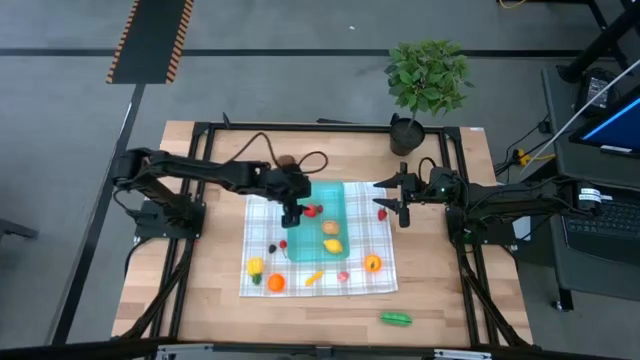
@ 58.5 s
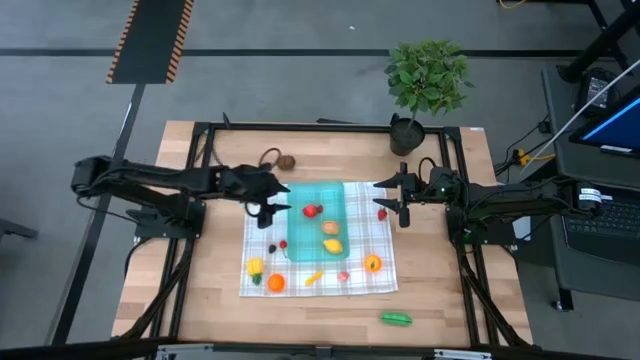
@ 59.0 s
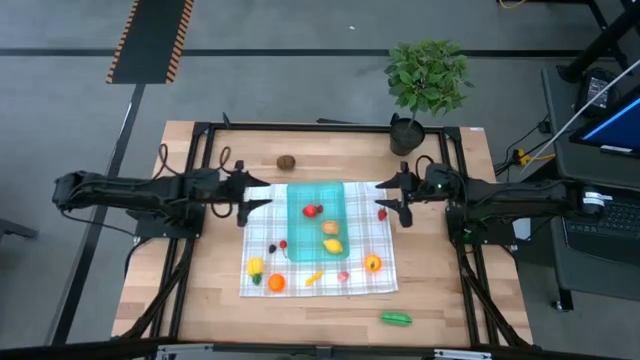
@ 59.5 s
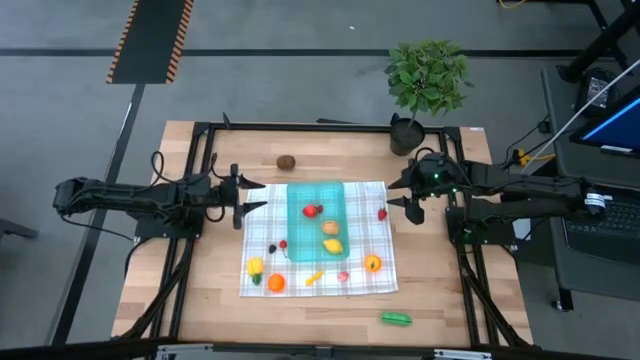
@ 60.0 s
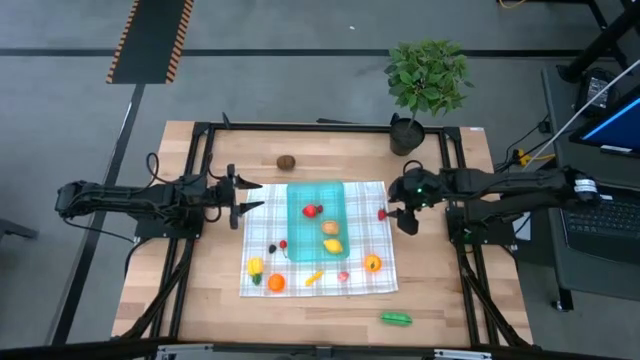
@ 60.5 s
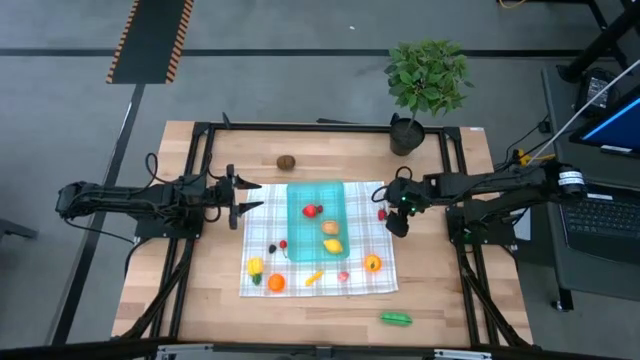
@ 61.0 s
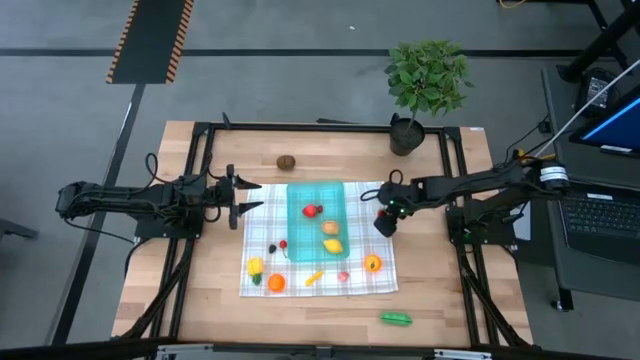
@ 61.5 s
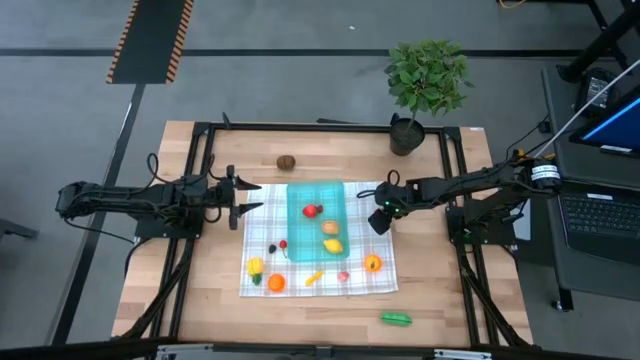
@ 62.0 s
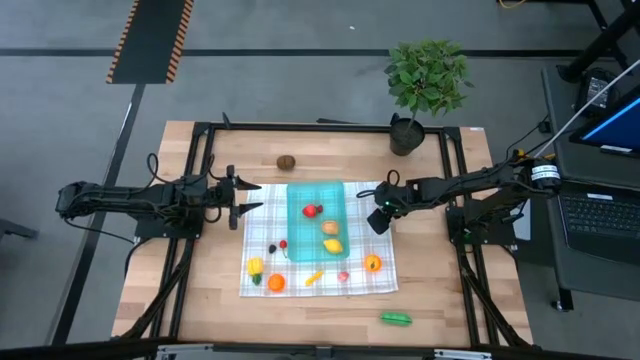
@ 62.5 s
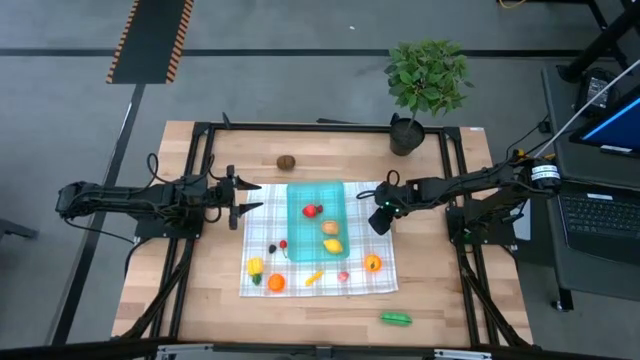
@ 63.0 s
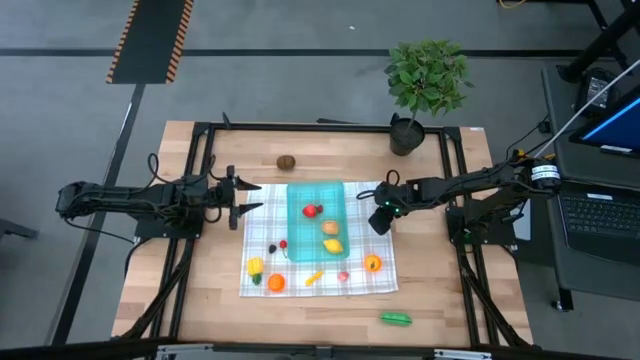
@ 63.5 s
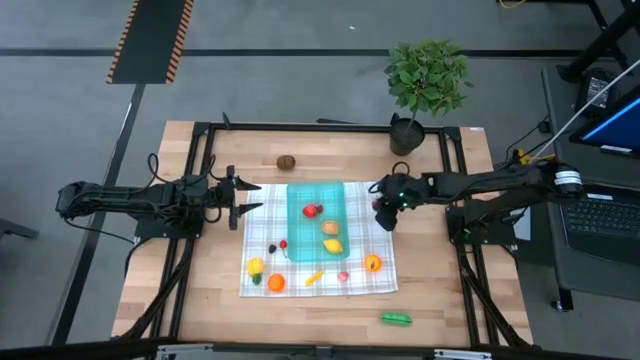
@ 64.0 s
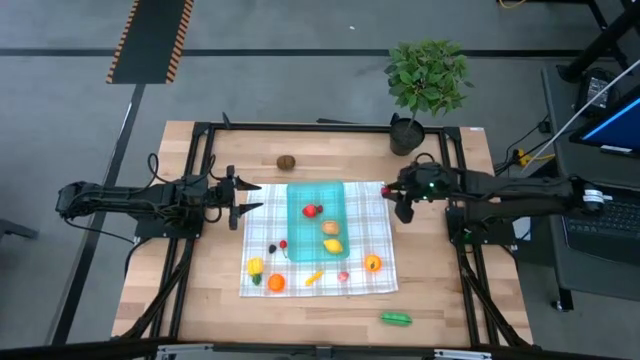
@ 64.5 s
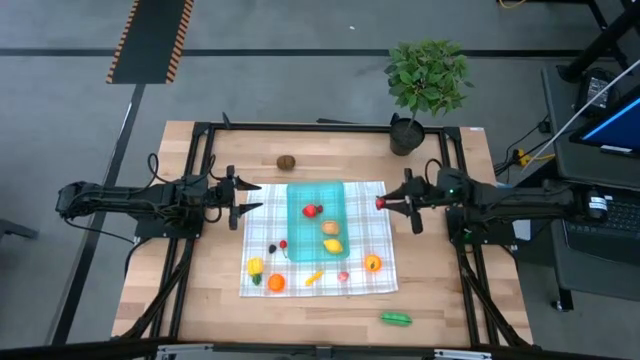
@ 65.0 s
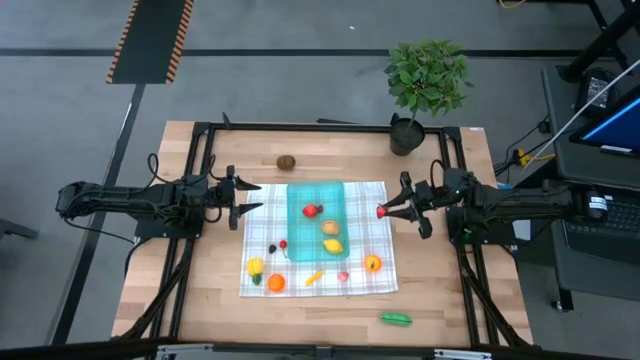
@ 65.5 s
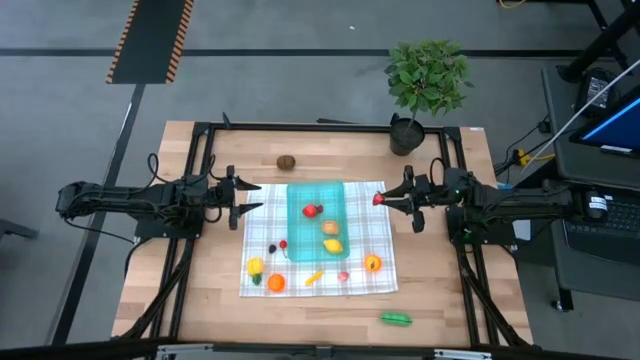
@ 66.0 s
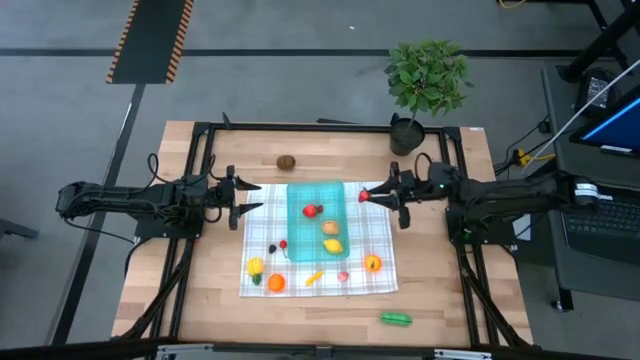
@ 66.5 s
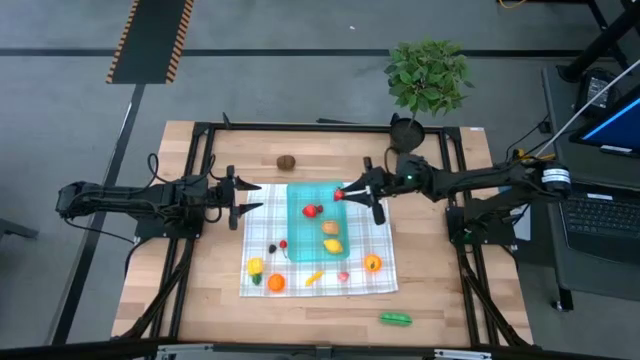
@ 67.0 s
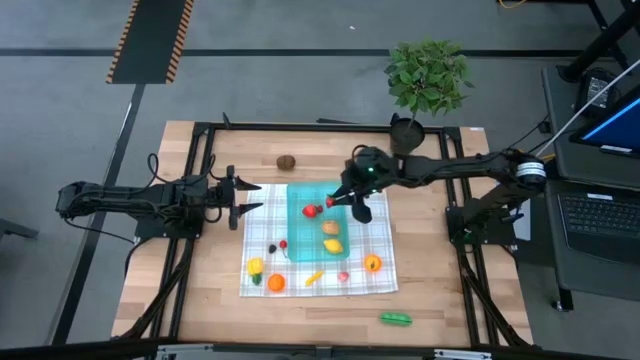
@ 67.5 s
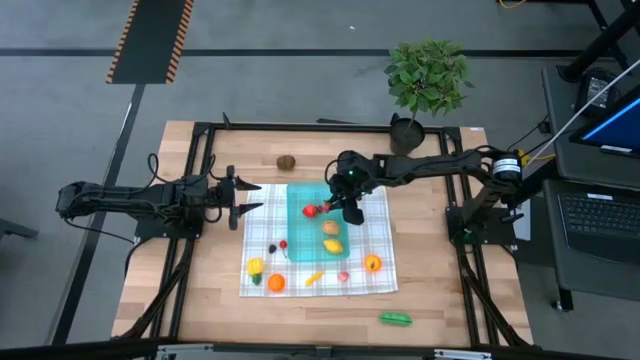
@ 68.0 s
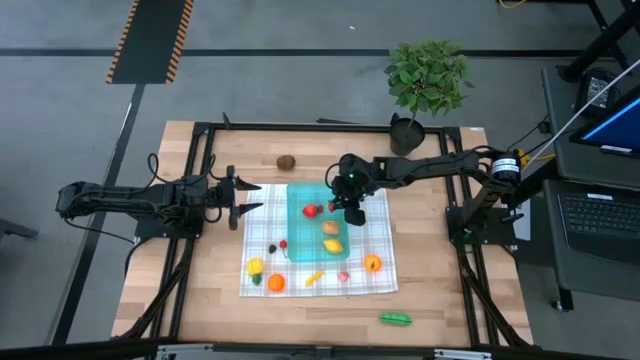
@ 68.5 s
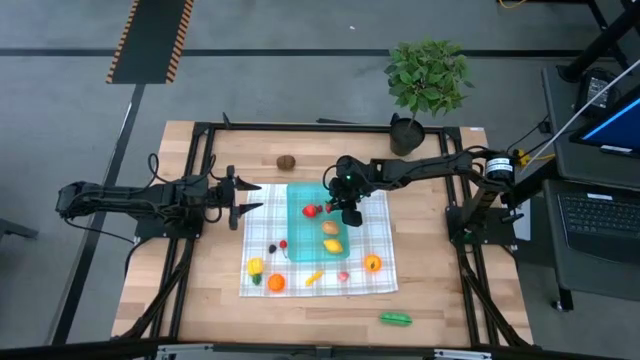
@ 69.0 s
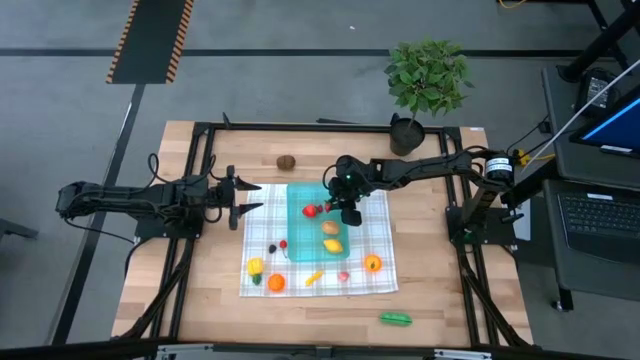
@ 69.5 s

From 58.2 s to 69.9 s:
Task: Pick and placing Produce into tupperware
Put the strawberry into the blue bin

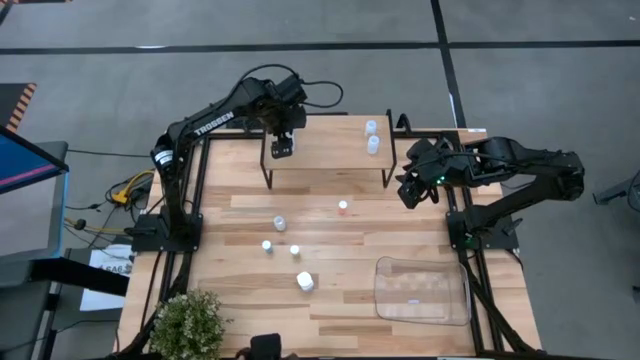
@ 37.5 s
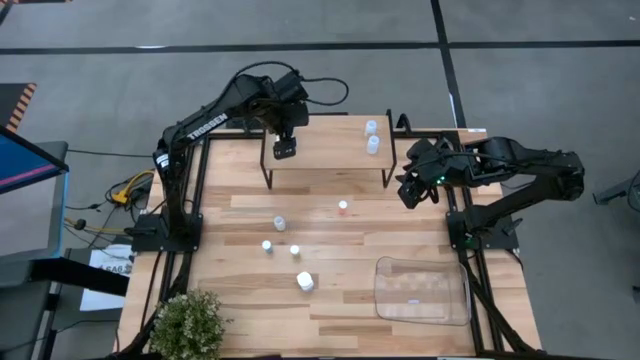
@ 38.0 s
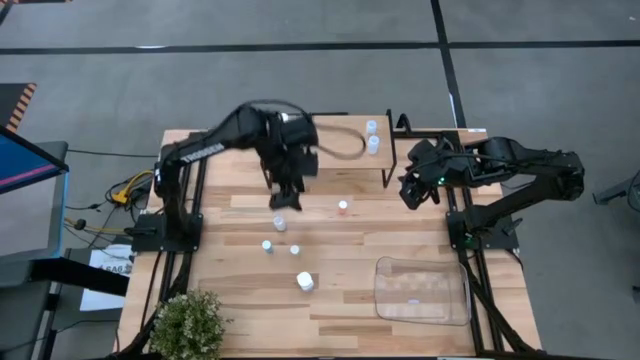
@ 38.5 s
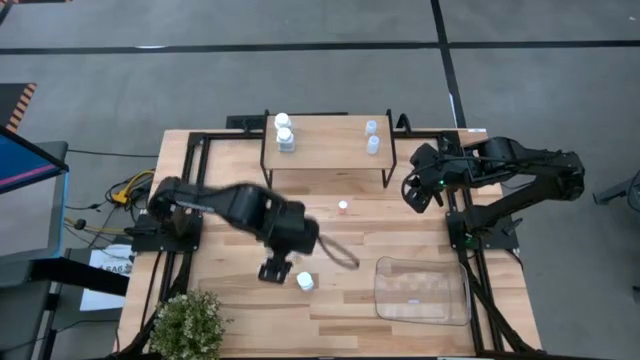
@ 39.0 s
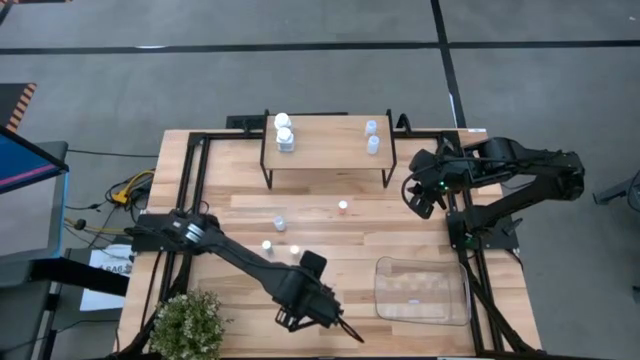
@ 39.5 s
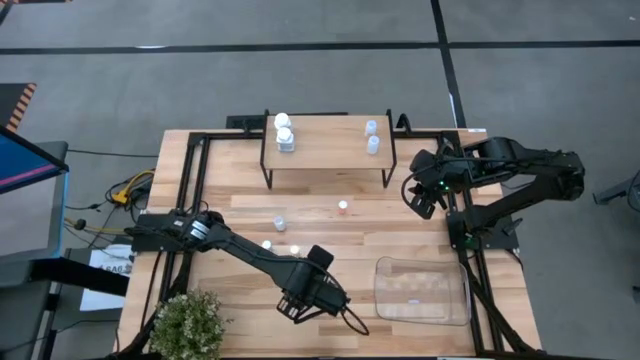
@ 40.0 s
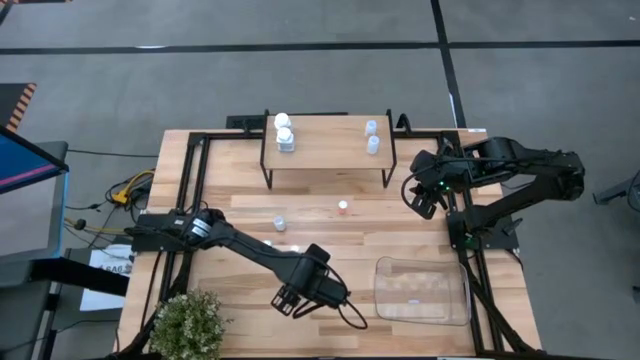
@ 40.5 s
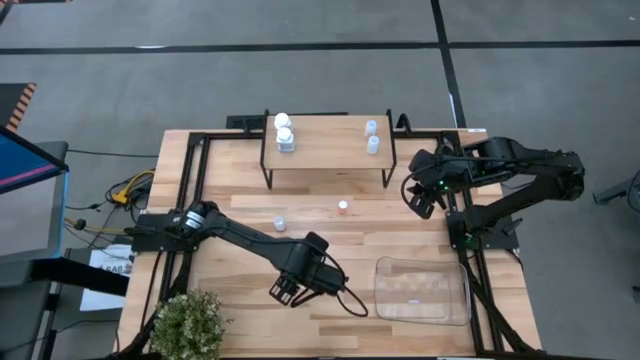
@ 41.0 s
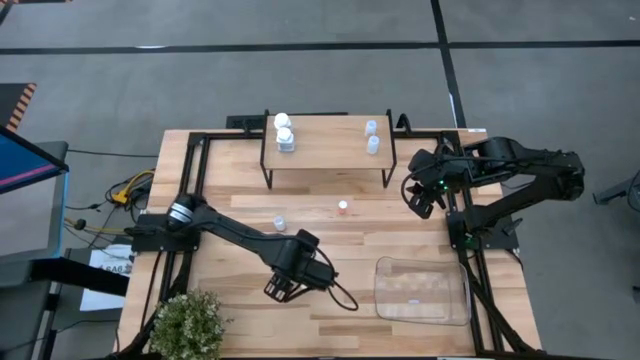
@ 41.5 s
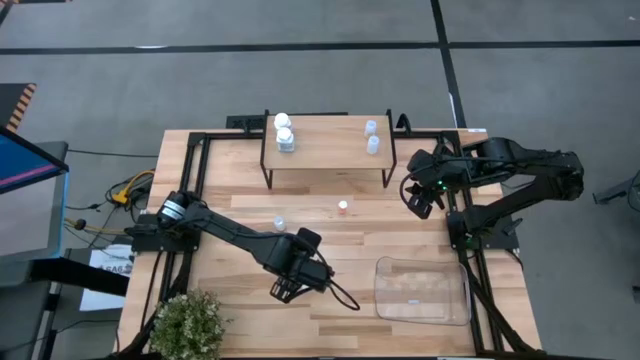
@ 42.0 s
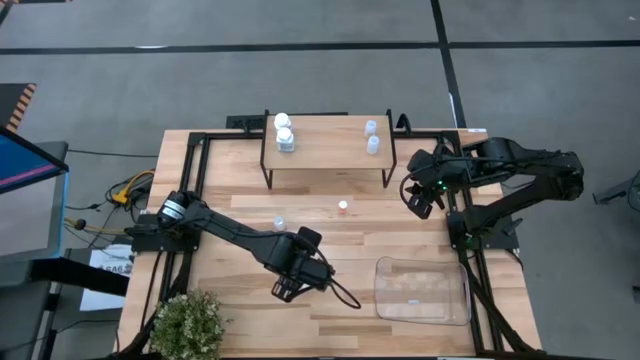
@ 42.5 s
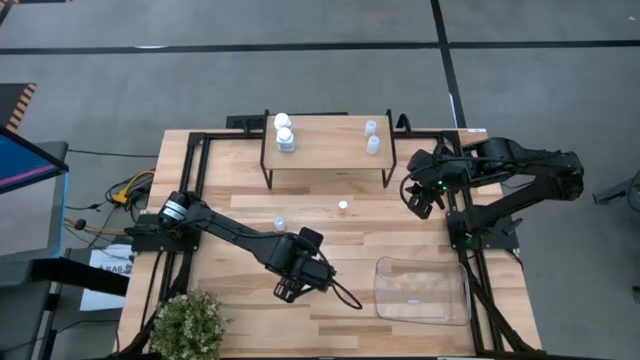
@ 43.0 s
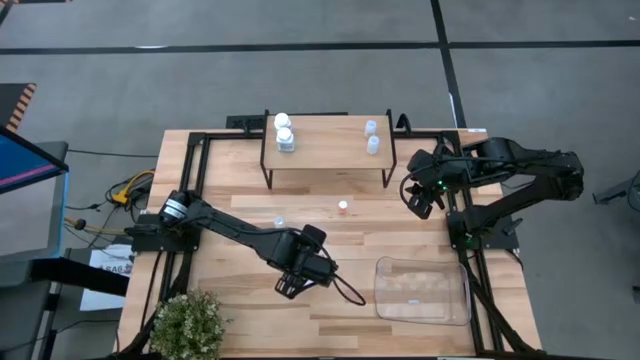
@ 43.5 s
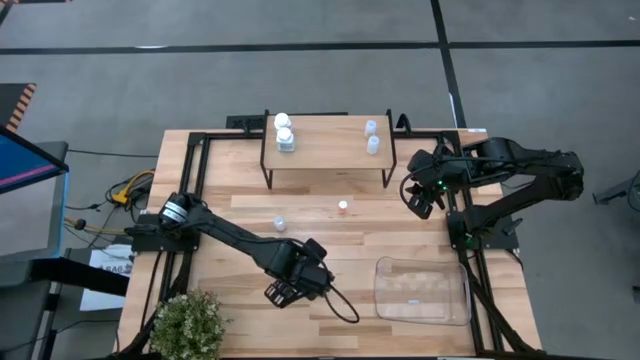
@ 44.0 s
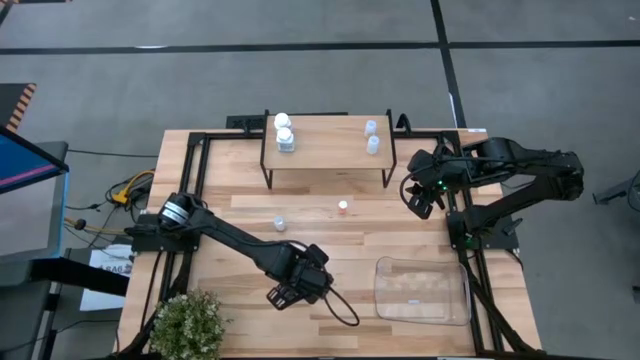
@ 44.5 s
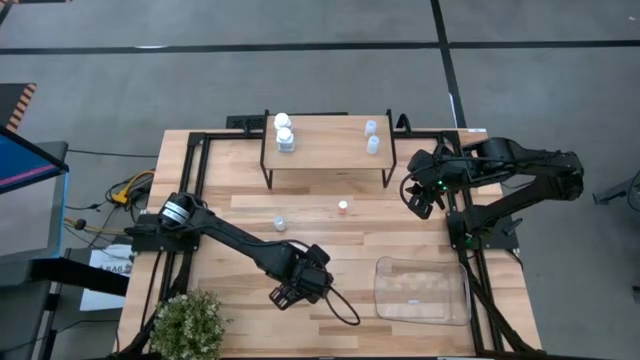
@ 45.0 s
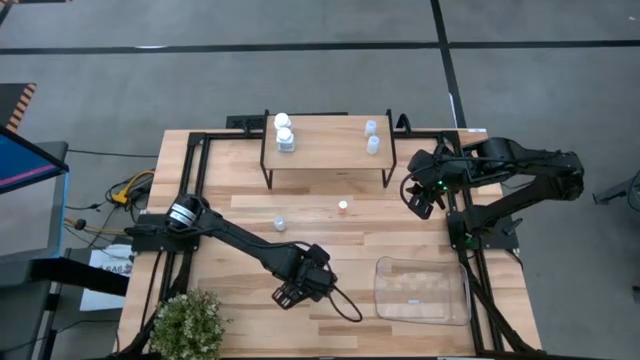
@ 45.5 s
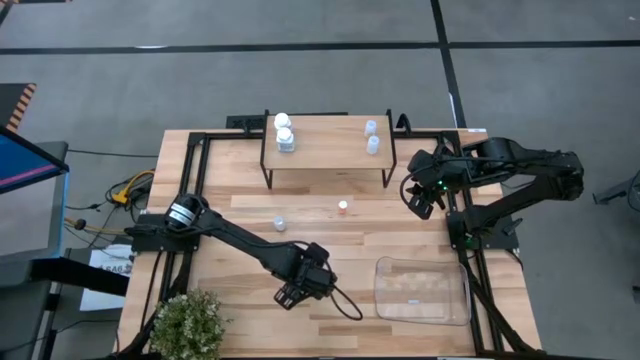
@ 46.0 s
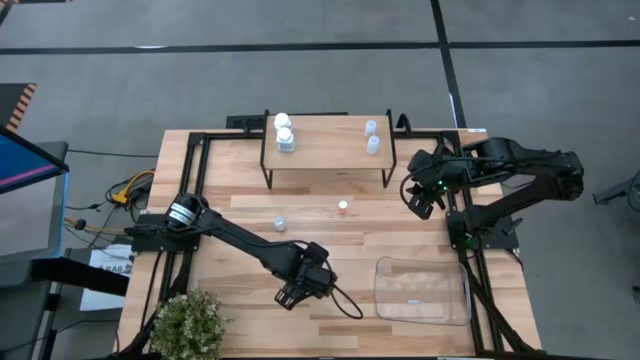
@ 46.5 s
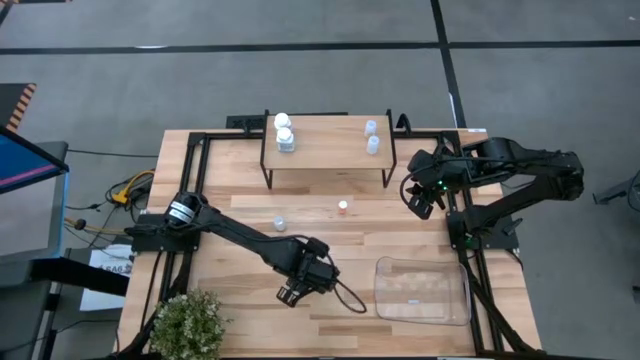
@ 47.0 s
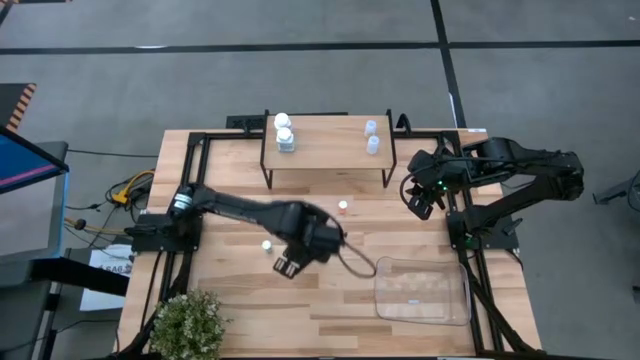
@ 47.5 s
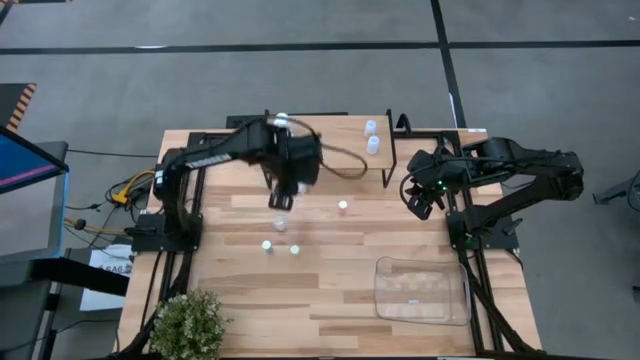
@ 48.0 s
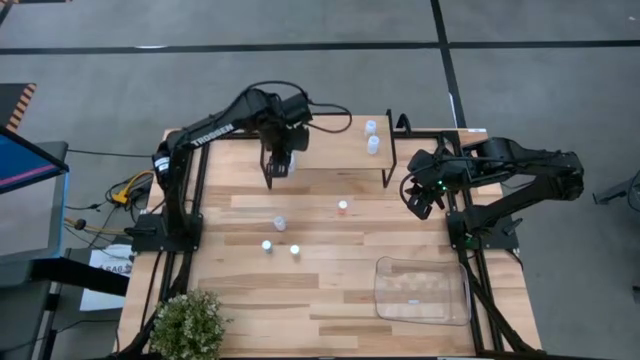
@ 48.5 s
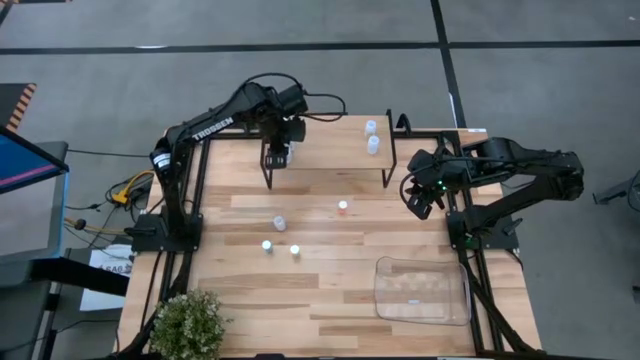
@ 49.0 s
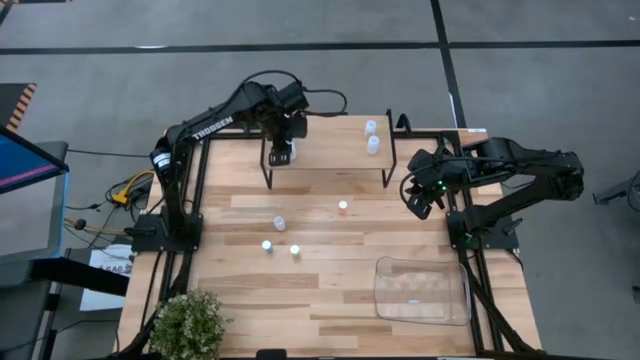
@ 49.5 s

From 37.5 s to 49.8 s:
Task: Pick and place medicine bottles onto shelf by color
Put the white pill bottle on the shelf aligned with the other white pill bottles
